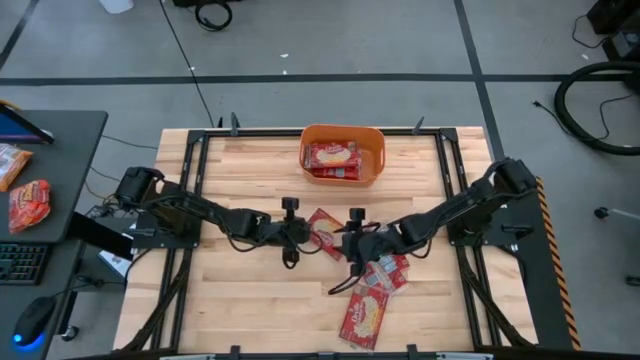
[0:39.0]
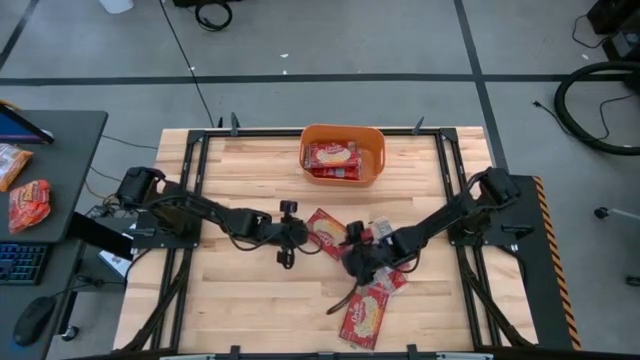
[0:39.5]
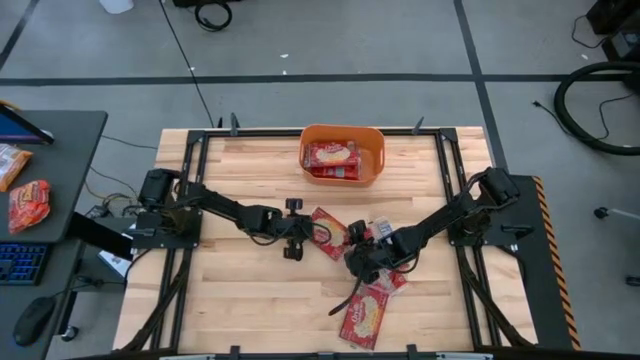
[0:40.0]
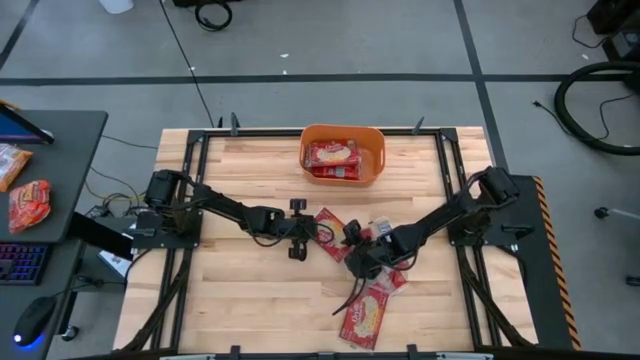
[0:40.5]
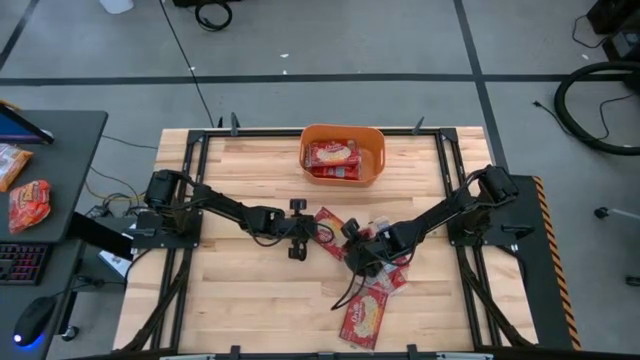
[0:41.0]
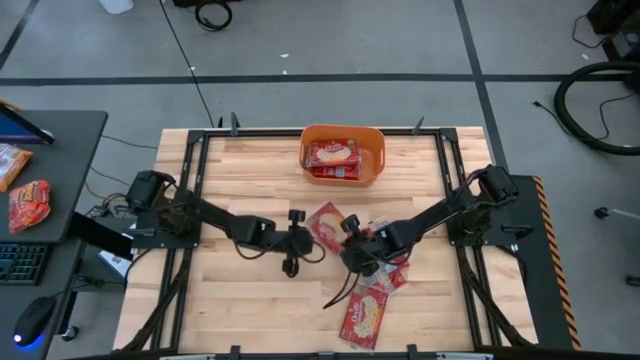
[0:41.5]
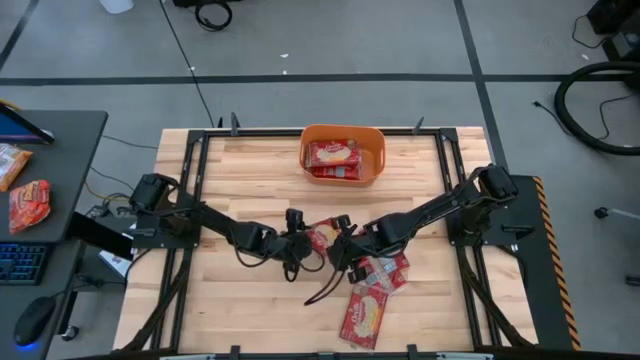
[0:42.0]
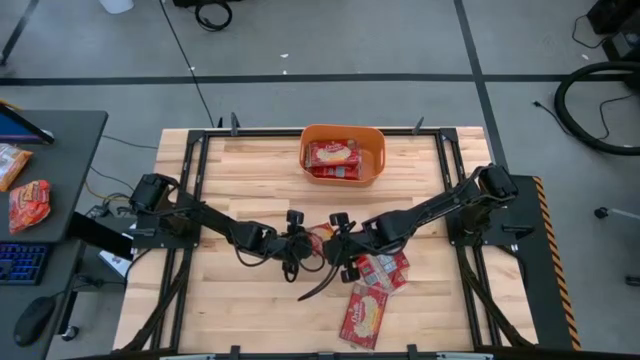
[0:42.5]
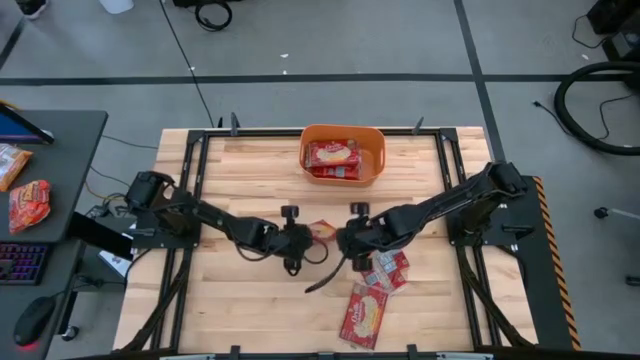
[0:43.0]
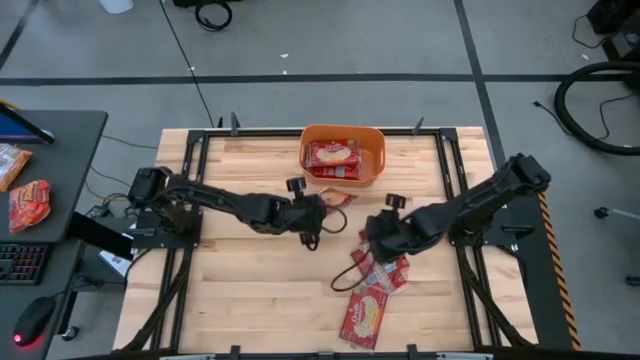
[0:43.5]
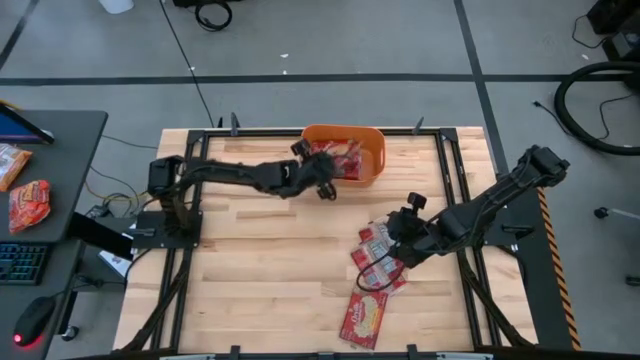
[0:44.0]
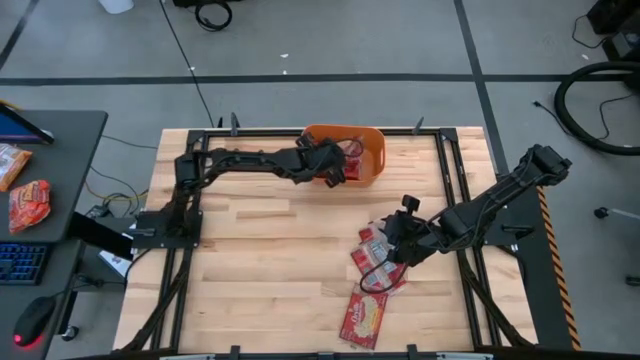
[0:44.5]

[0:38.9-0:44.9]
Task: Sort popcorn bags into baskets
Put the red popcorn bag into the orange bin

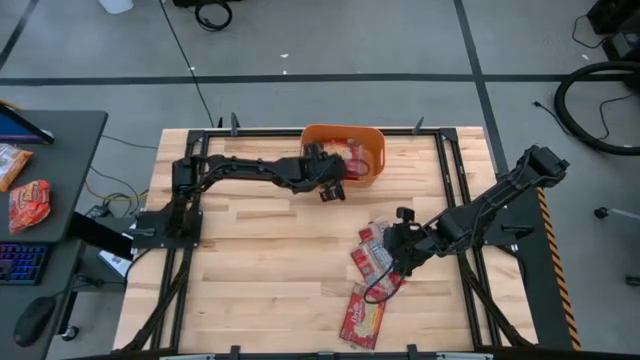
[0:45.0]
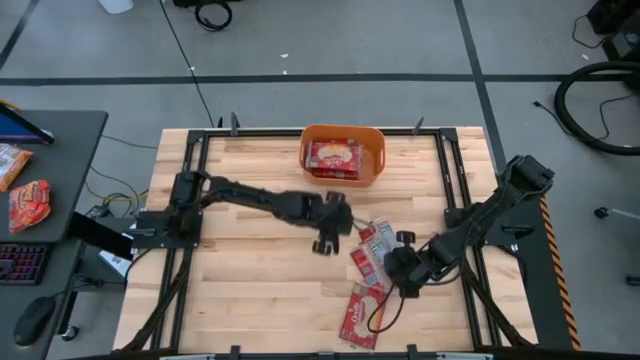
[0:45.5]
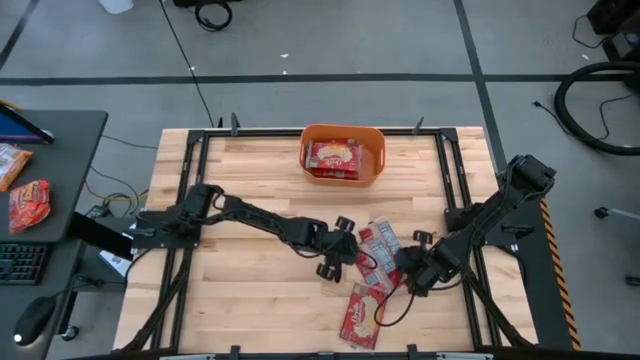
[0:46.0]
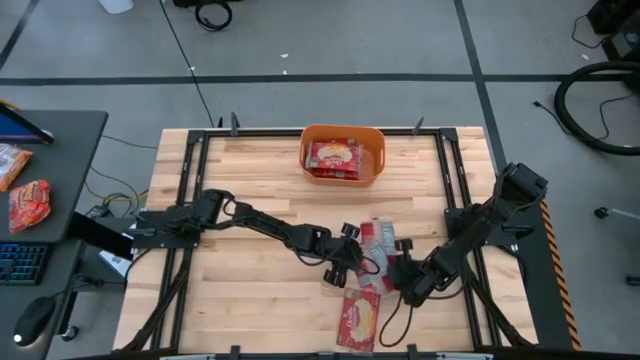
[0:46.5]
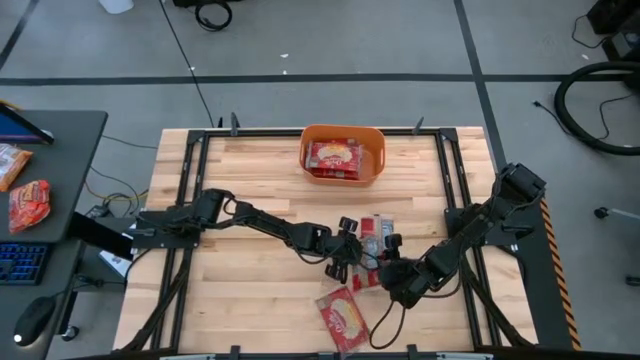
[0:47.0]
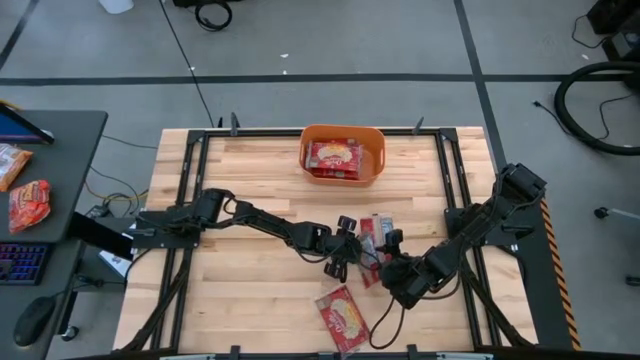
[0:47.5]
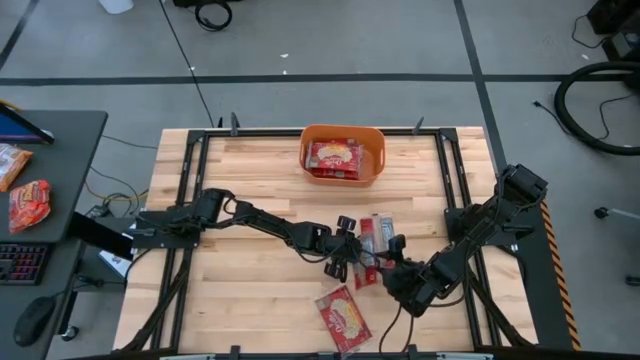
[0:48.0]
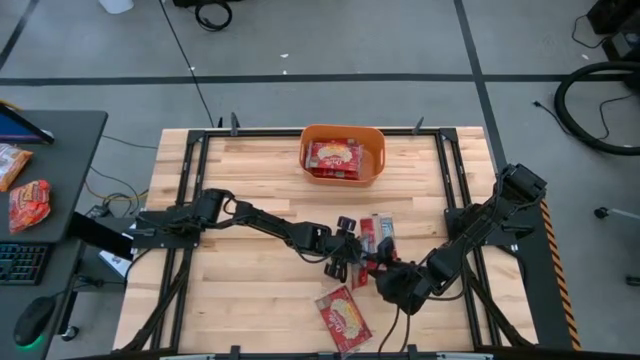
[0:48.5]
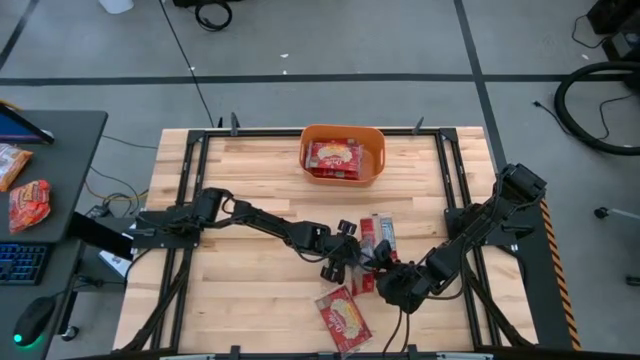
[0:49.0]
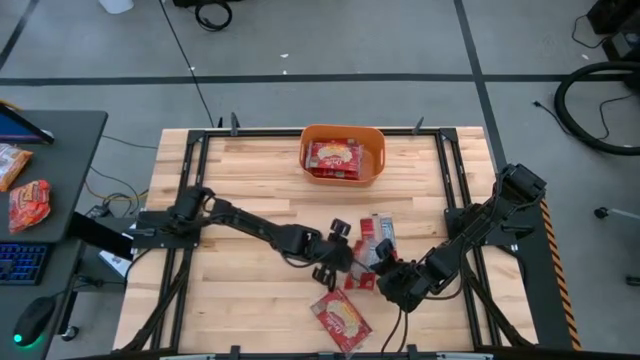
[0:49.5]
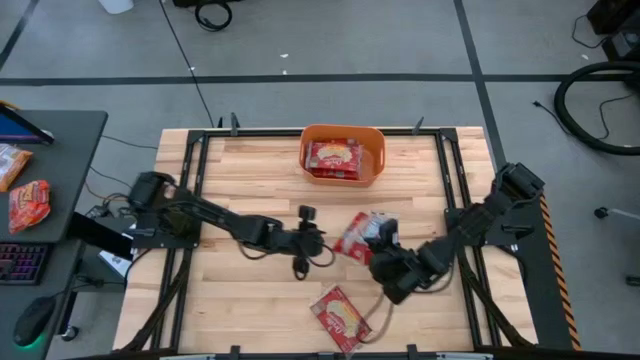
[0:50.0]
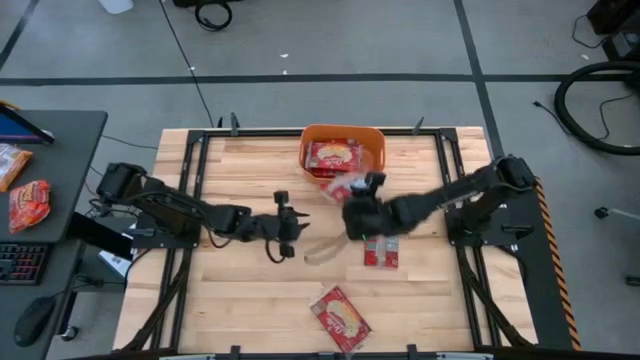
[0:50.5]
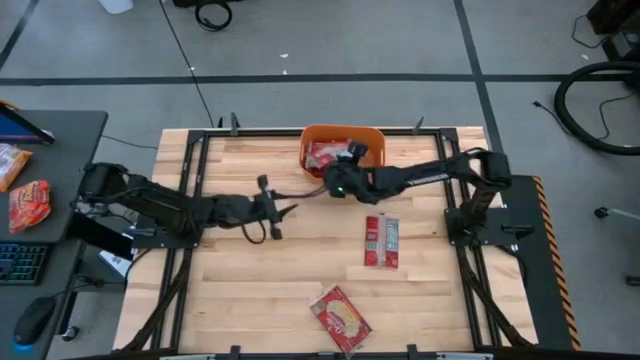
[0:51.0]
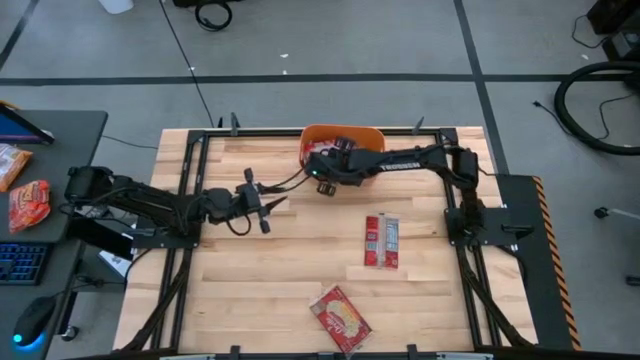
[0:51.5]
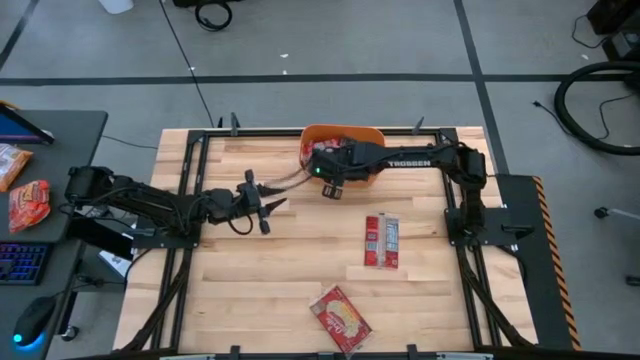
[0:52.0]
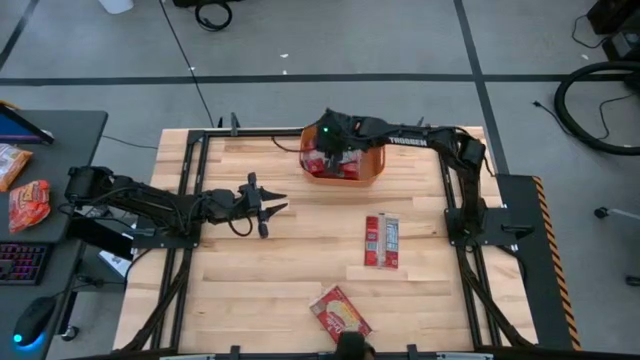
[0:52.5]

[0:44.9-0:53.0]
Put the red popcorn bag into the orange bin

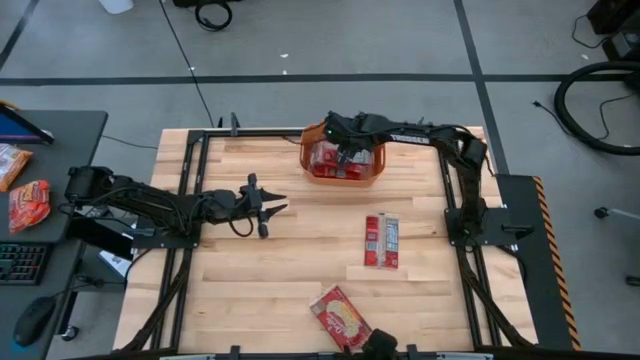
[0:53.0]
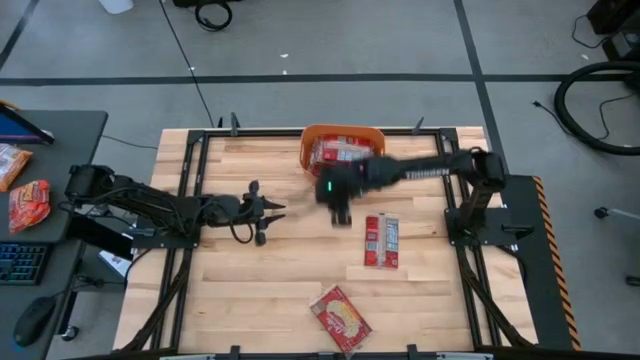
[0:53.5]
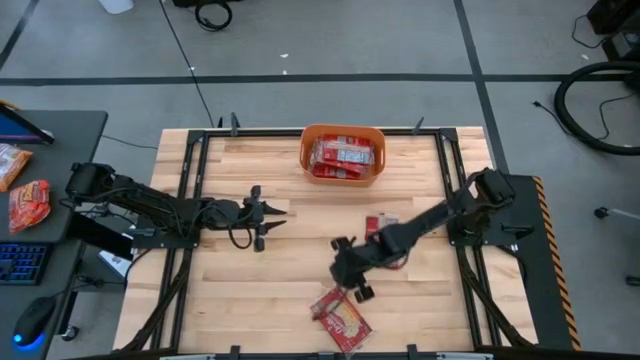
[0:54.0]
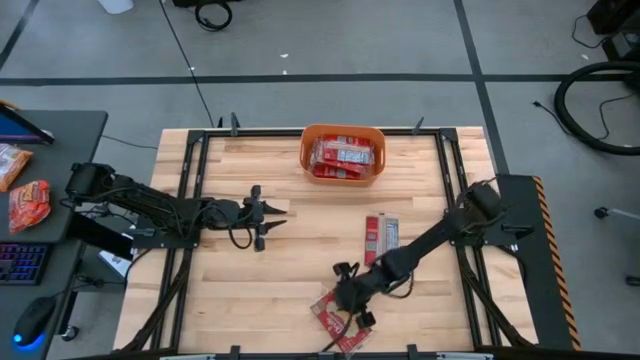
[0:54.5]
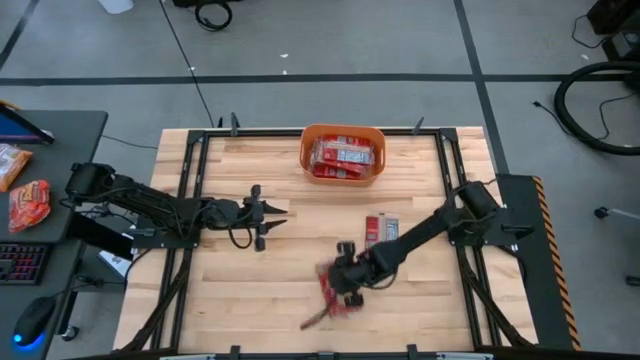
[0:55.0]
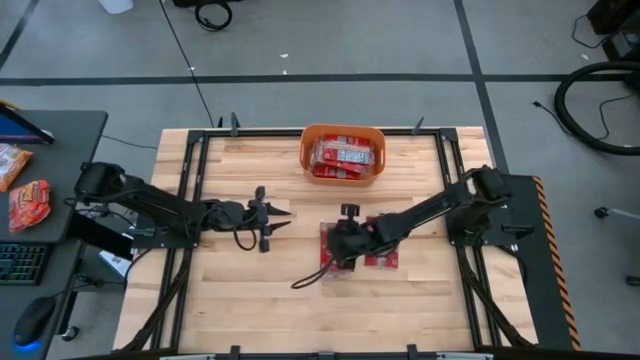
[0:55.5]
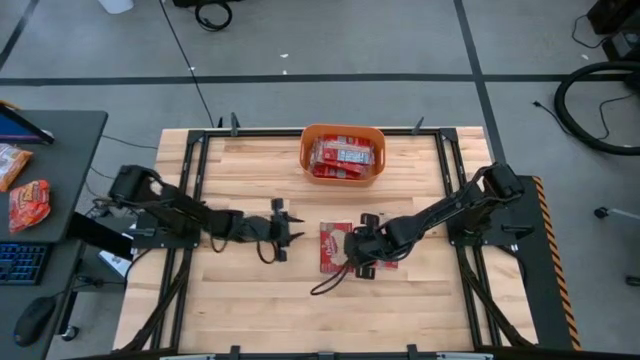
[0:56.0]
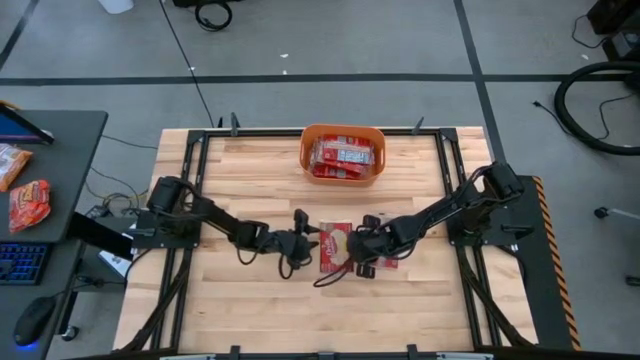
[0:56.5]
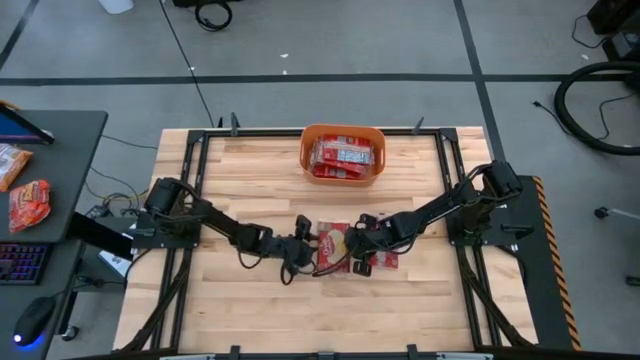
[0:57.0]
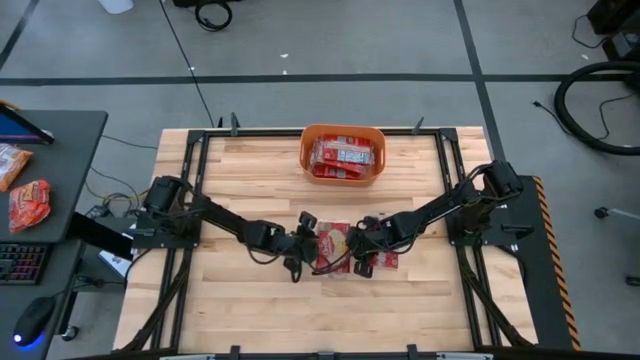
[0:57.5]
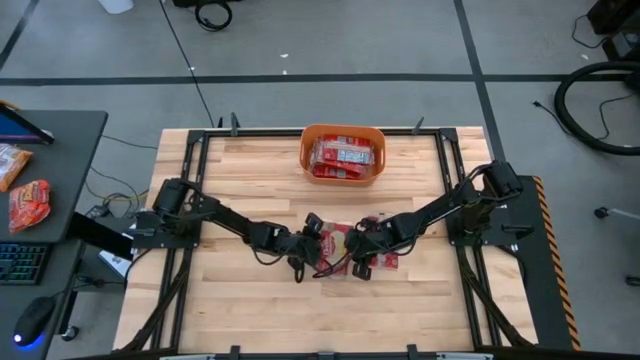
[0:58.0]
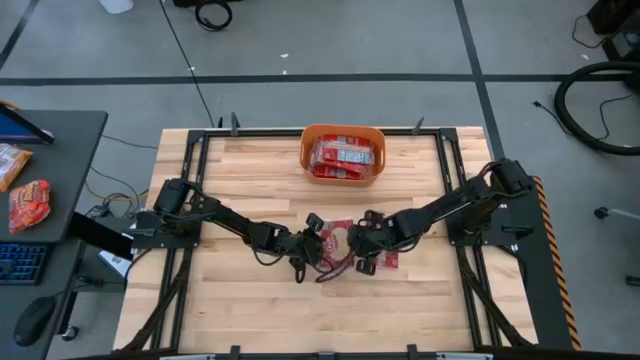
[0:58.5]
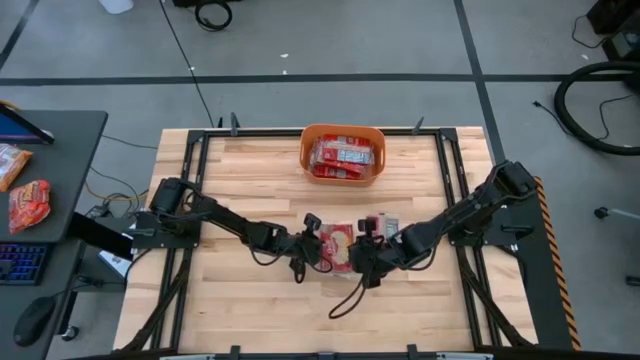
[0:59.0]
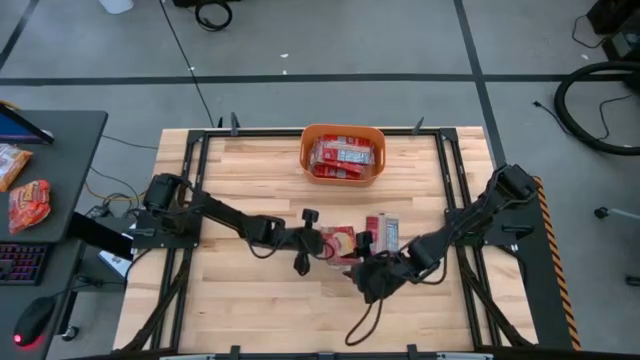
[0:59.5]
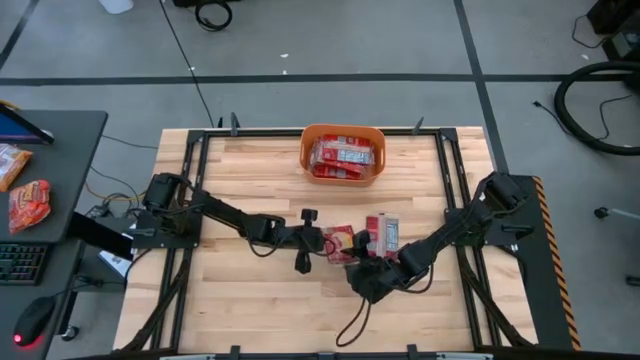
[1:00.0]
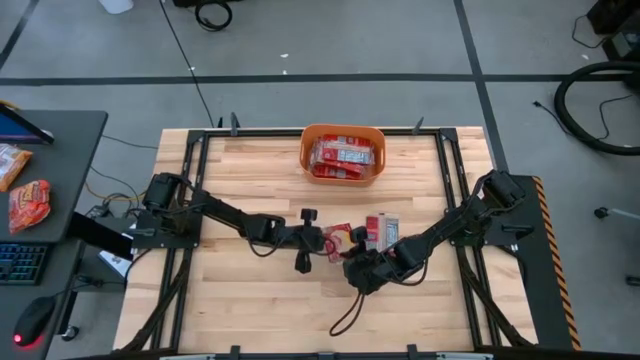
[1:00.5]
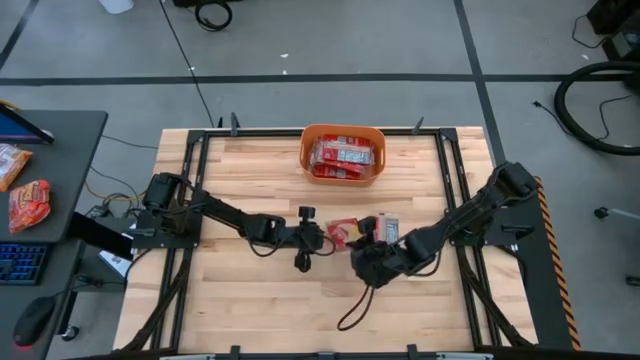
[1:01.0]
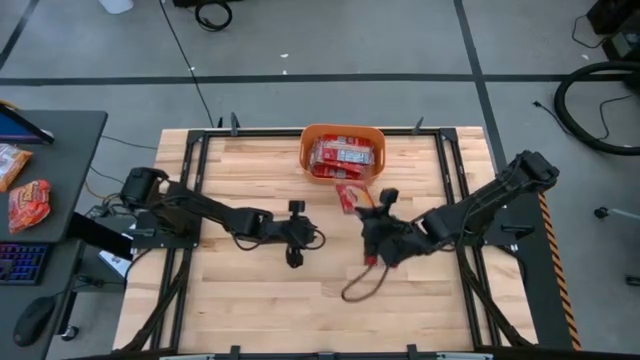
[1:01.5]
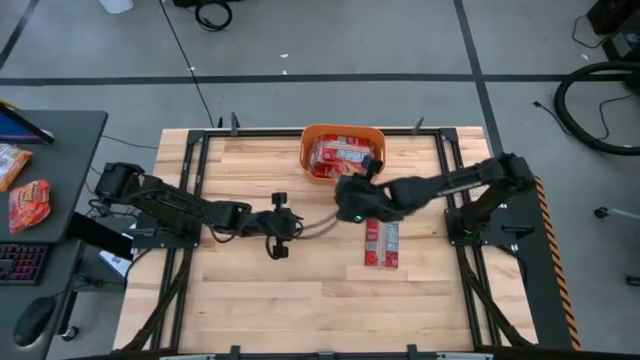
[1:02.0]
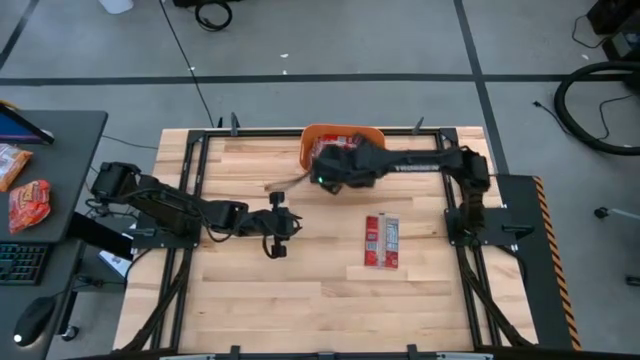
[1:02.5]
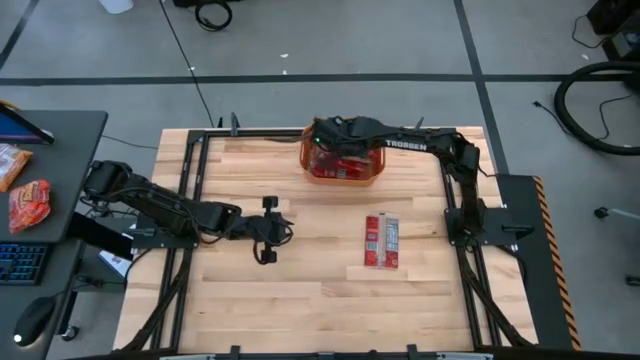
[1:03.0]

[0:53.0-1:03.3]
Put the red popcorn bag into the orange bin
